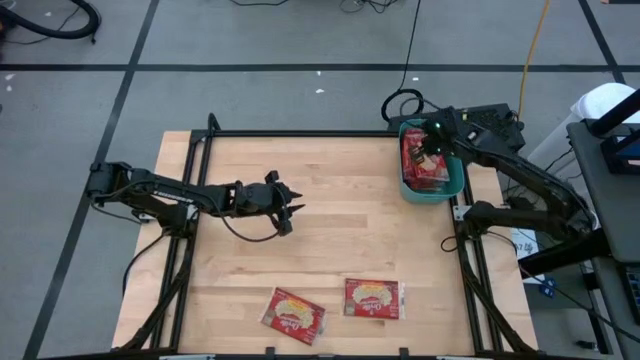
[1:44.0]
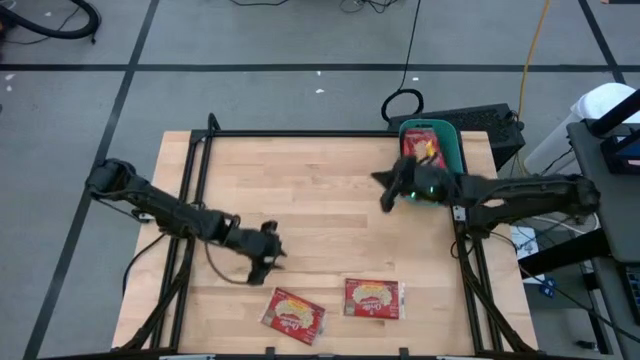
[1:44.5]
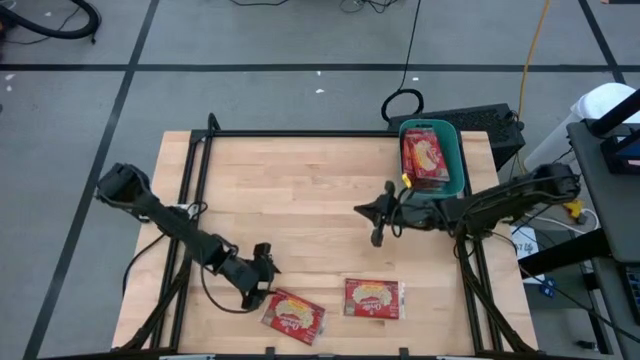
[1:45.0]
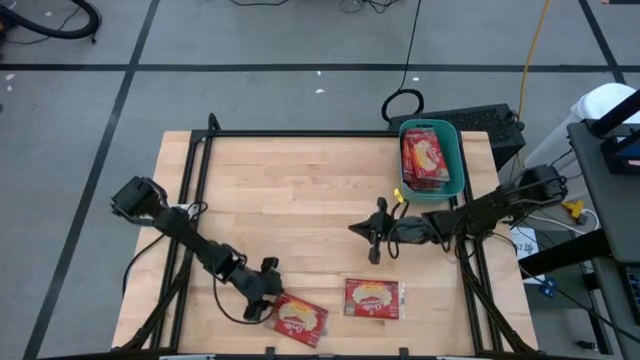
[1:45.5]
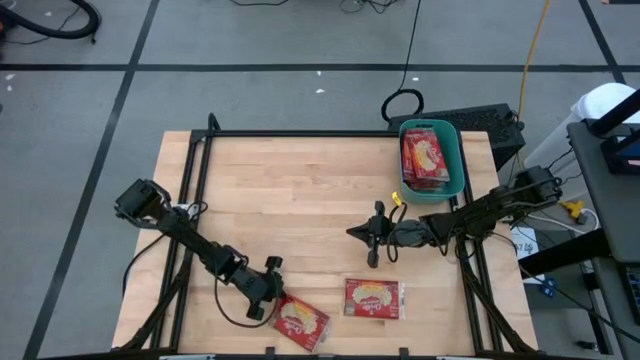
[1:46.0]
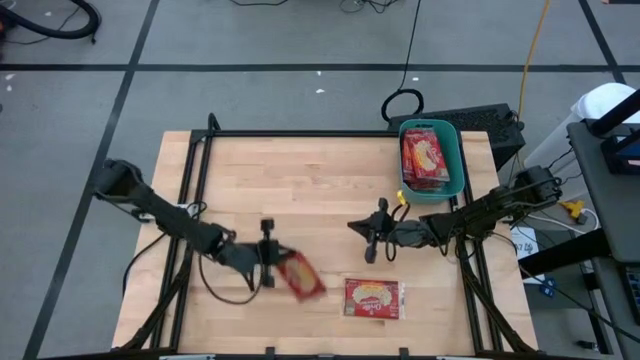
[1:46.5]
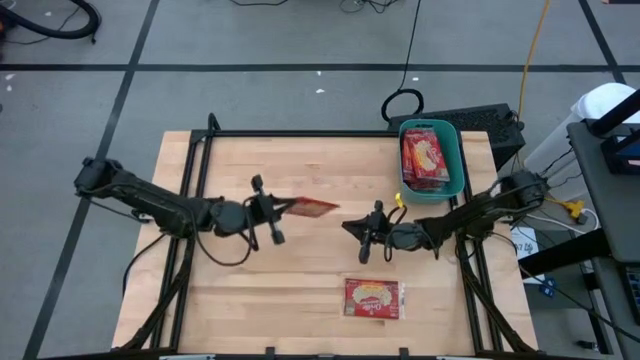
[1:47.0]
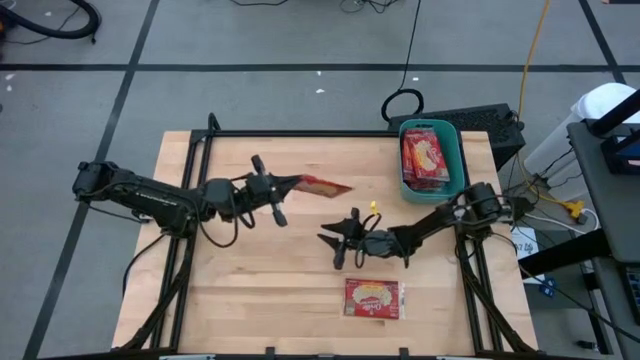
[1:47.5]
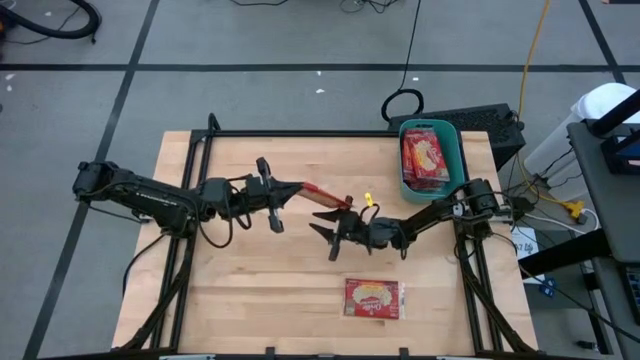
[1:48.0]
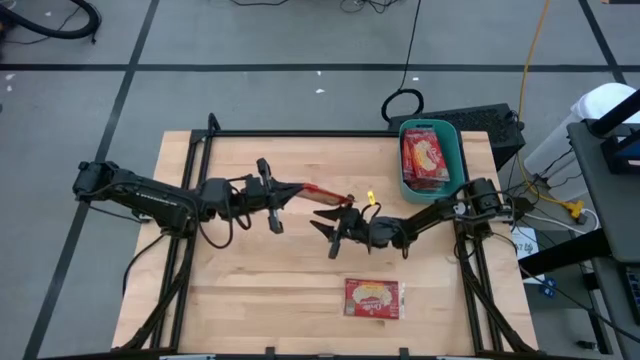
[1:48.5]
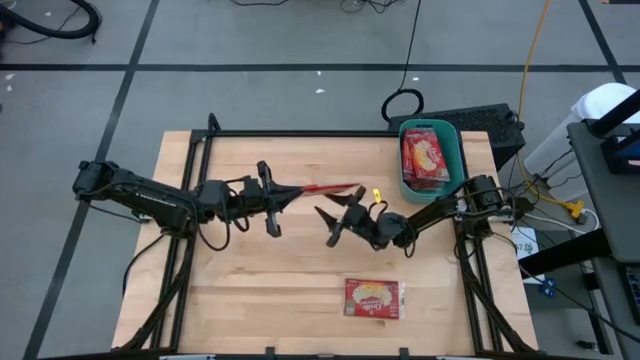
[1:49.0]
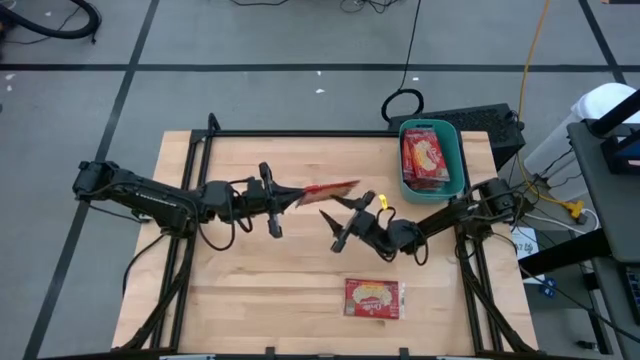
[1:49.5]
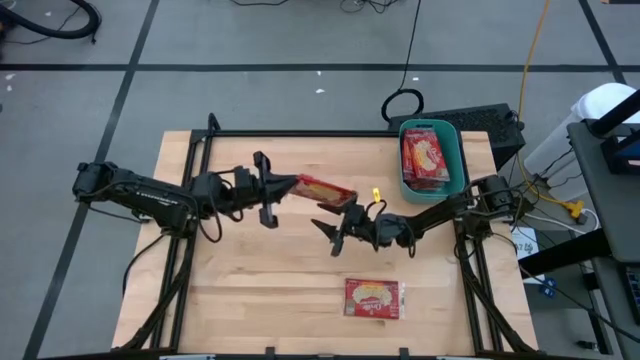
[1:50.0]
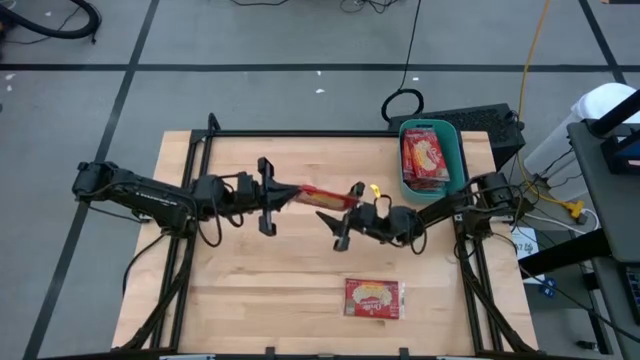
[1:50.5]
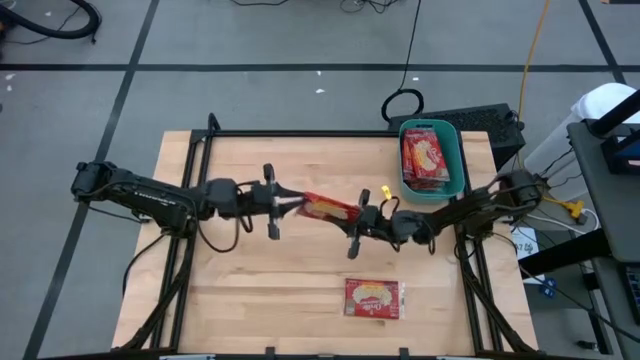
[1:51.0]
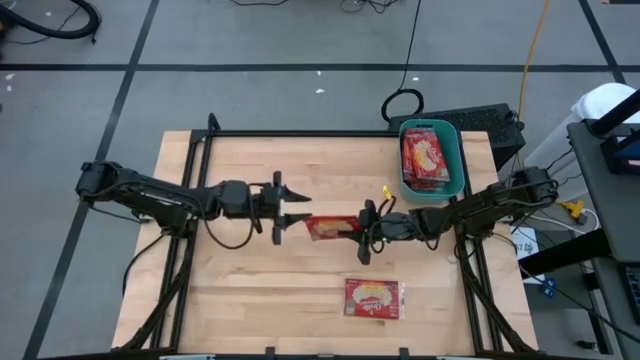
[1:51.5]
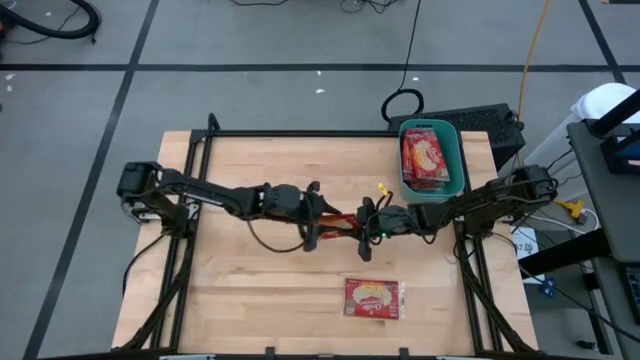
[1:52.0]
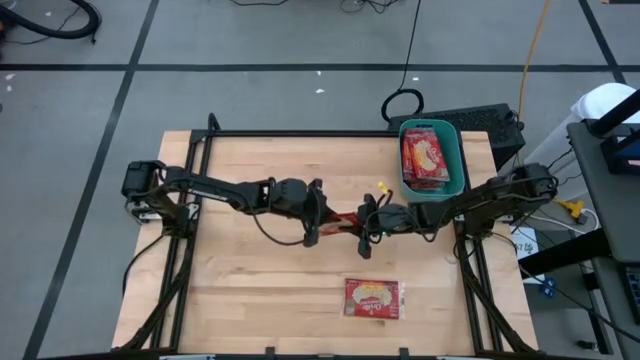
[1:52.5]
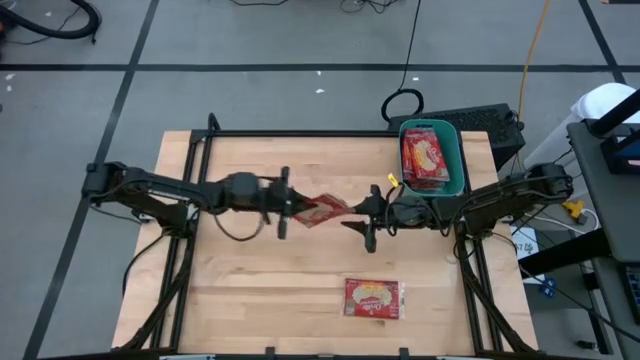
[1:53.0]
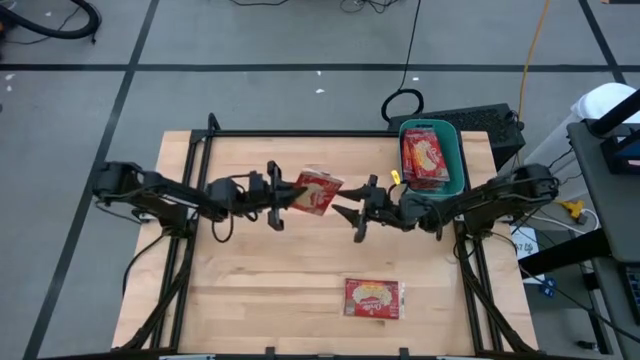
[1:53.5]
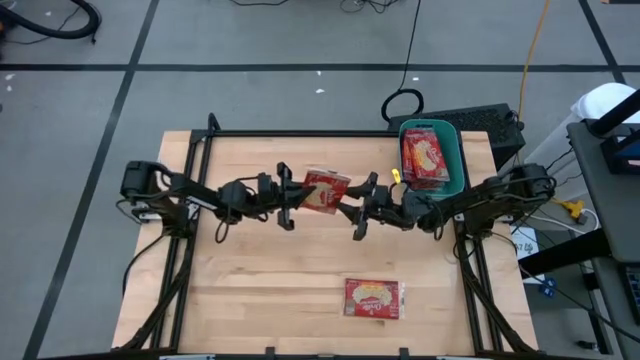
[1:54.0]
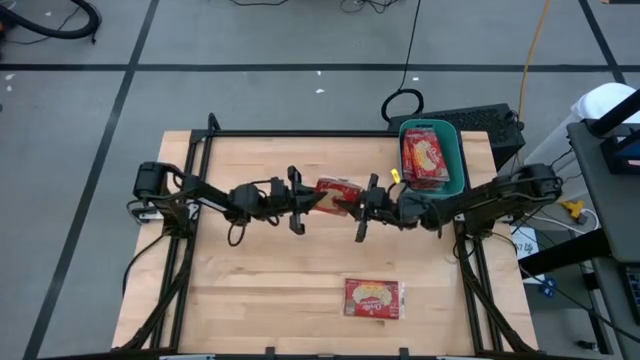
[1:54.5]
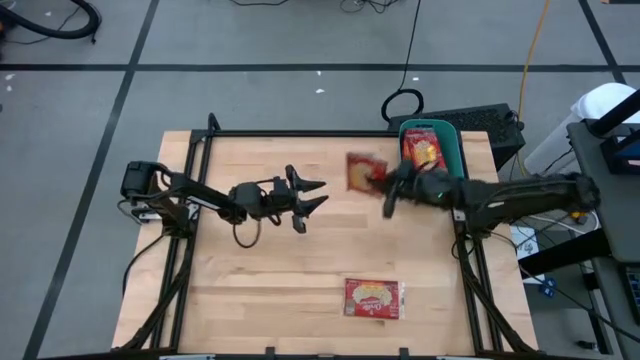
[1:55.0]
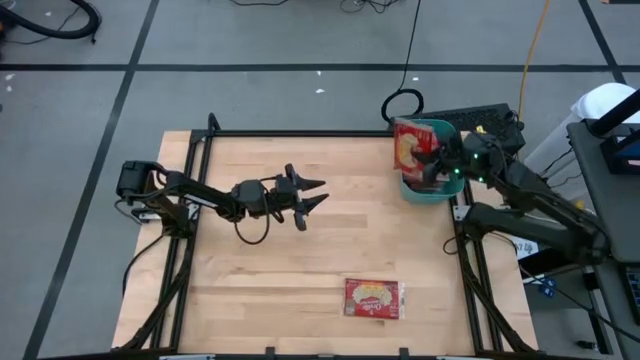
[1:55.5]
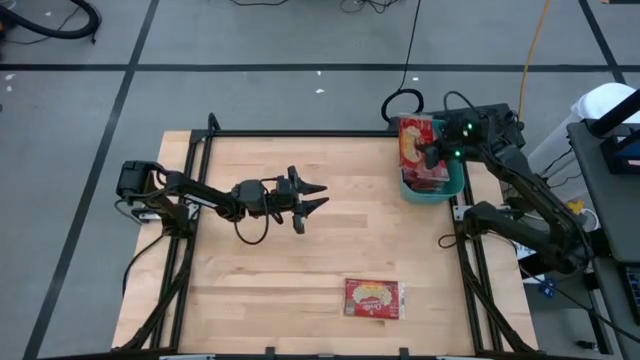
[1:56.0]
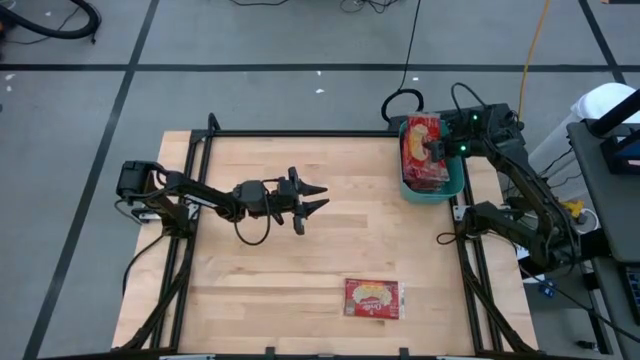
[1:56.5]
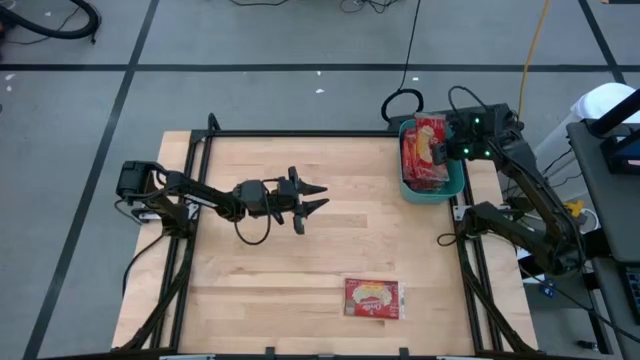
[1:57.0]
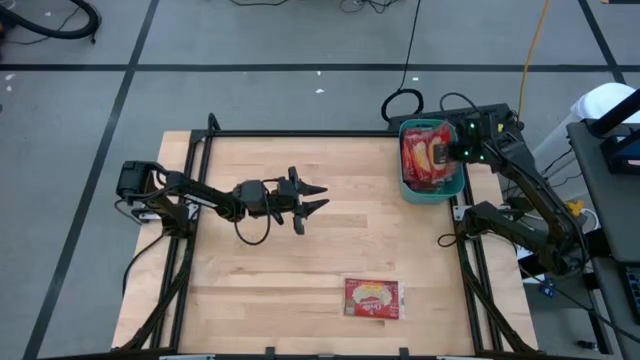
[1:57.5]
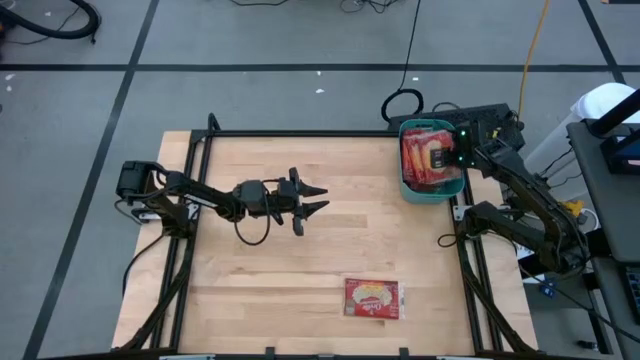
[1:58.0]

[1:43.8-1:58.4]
Task: Sort popcorn bags into baskets
Put the red popcorn bag into the green bin

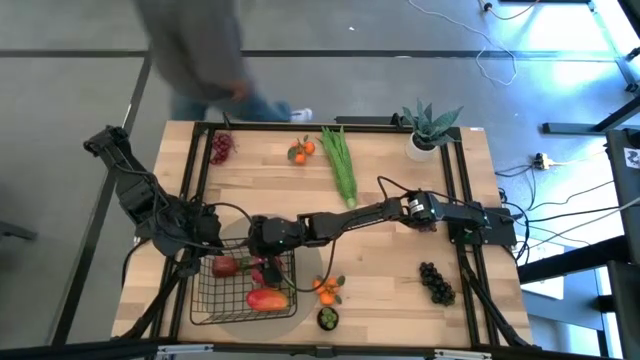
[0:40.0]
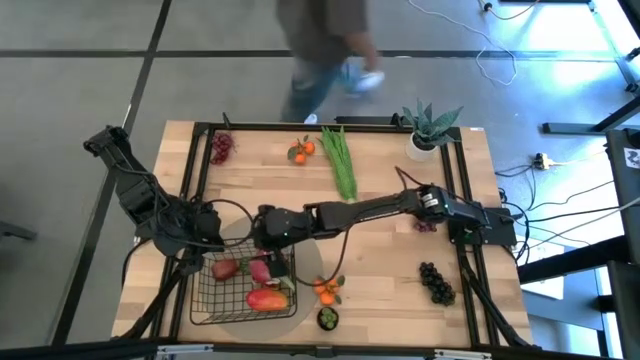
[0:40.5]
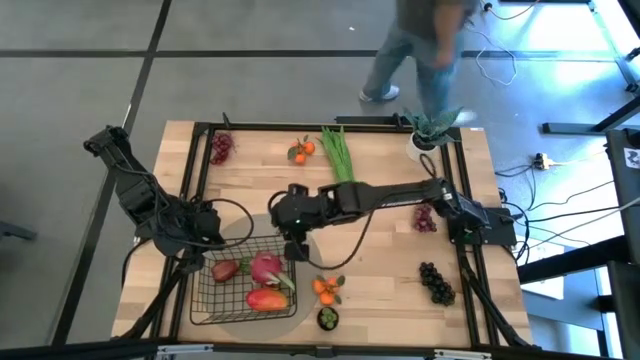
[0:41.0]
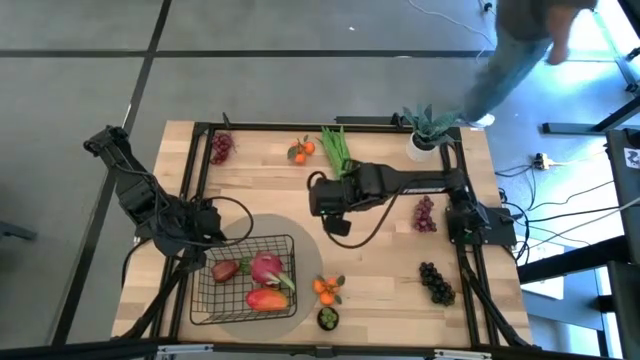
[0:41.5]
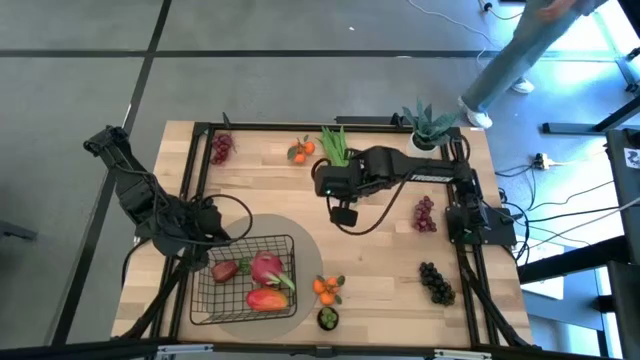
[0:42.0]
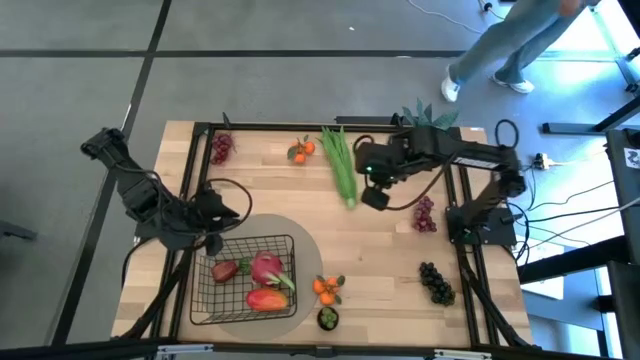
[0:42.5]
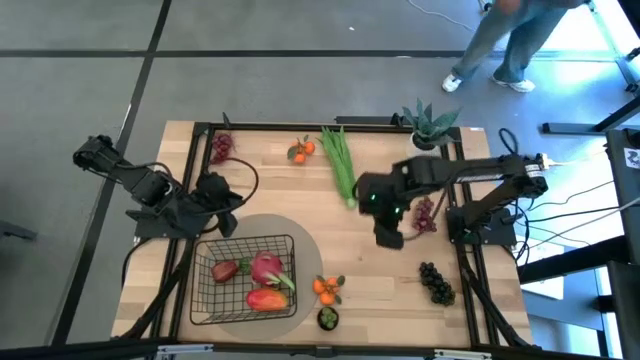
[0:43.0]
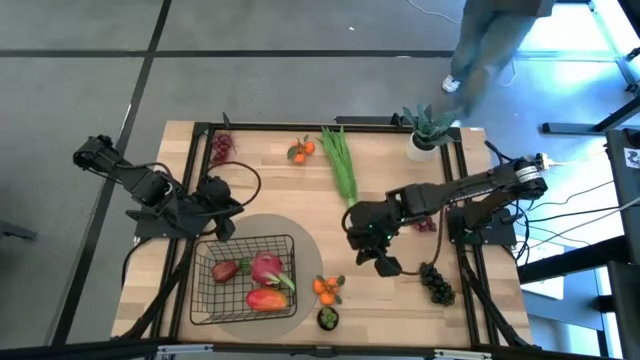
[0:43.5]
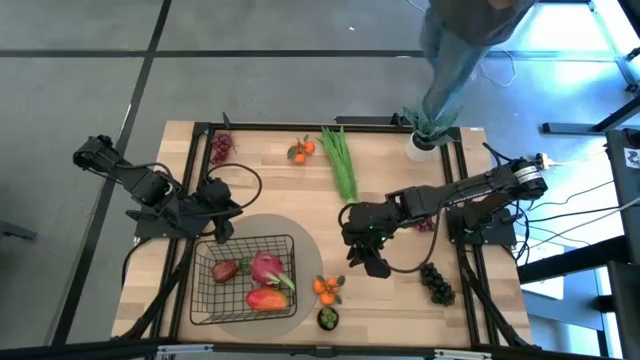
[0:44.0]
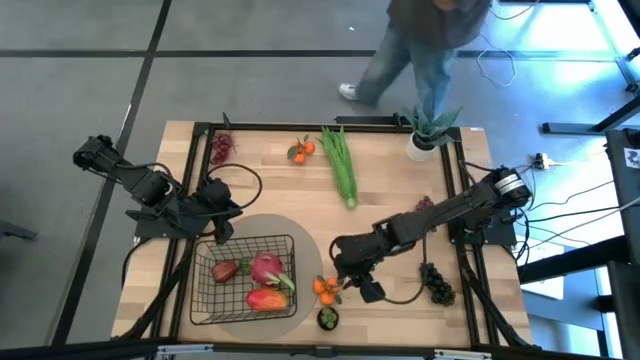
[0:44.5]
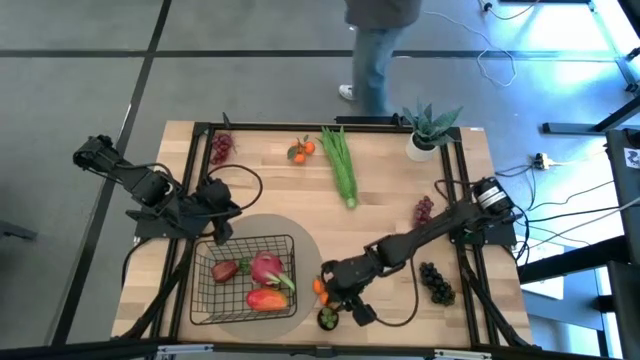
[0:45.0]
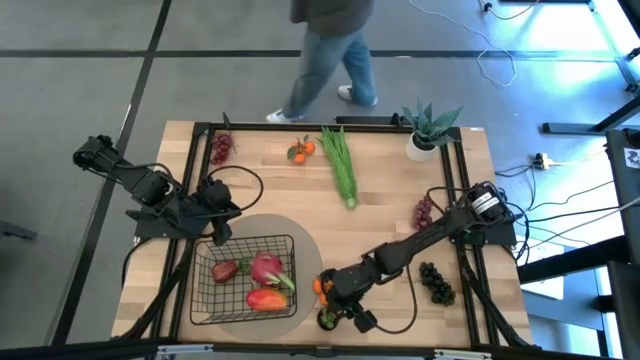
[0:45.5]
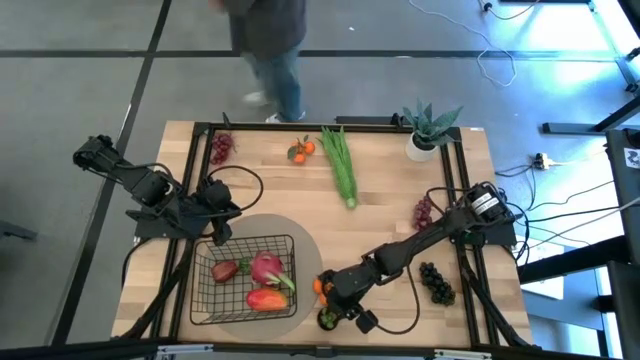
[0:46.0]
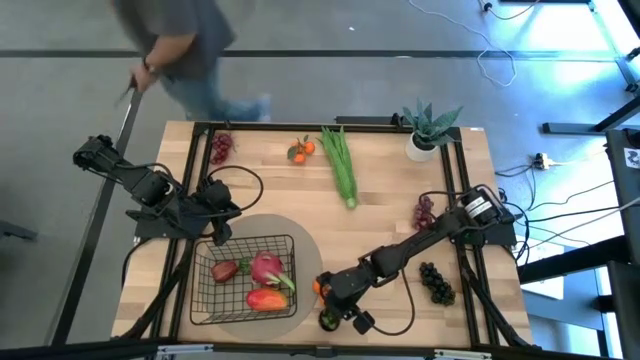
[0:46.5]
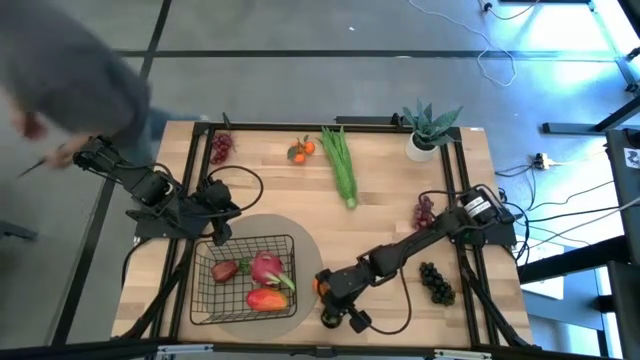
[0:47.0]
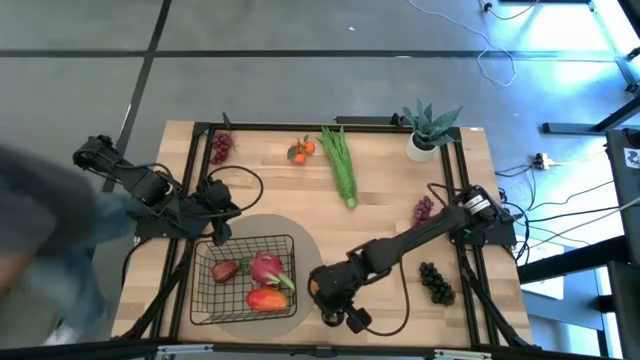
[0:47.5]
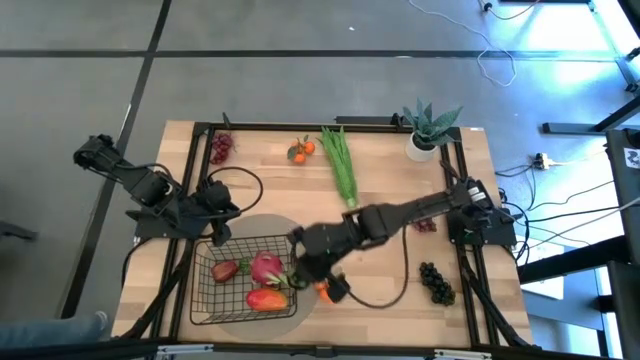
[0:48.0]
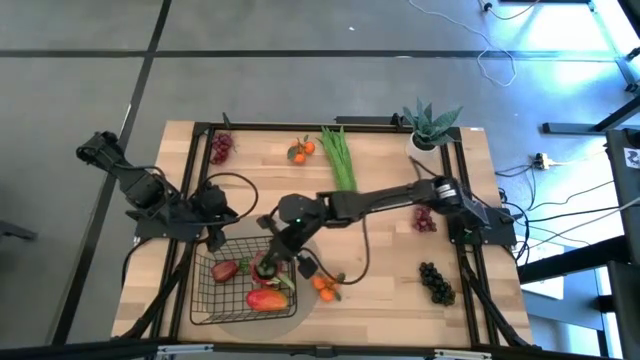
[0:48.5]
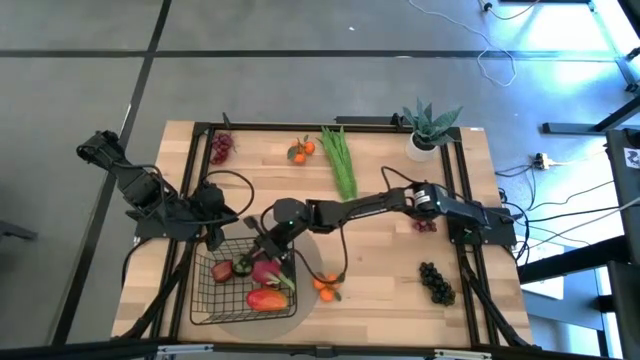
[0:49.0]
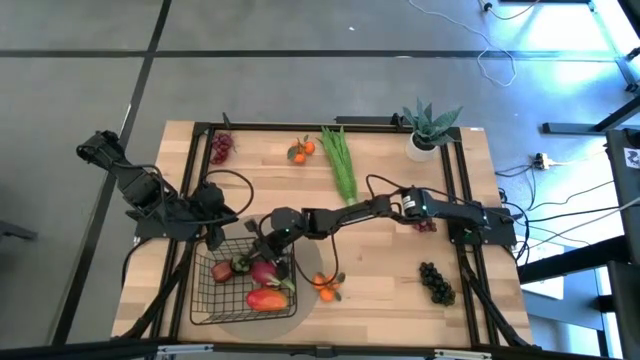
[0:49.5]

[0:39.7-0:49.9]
Task: Build produce basket
Put the black mangosteen into the black wire basket
